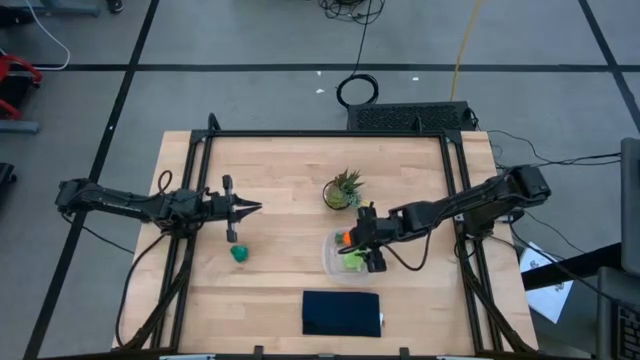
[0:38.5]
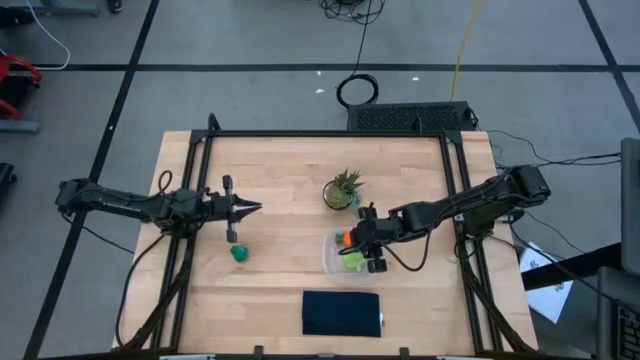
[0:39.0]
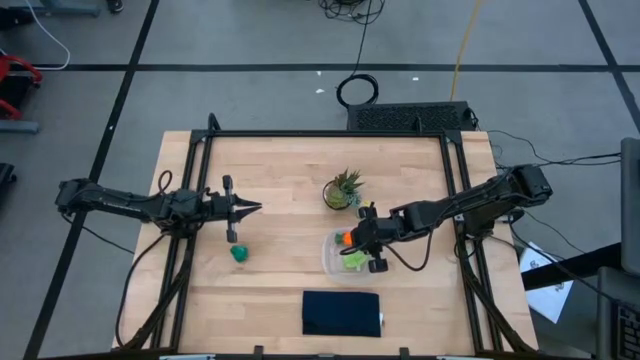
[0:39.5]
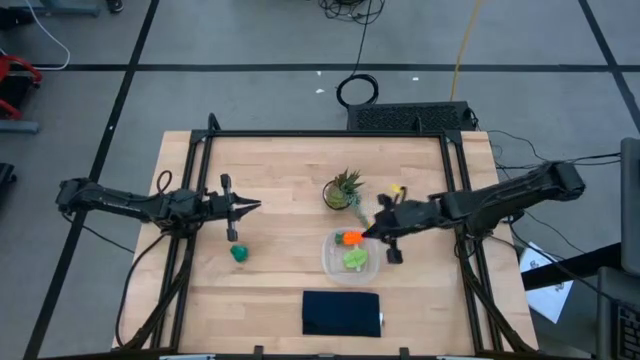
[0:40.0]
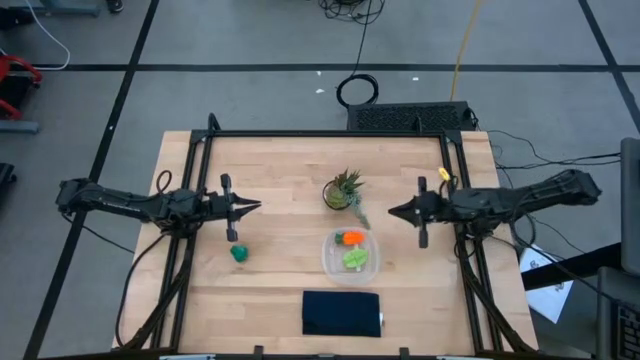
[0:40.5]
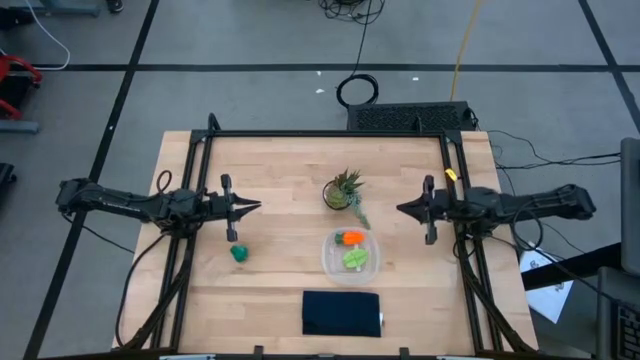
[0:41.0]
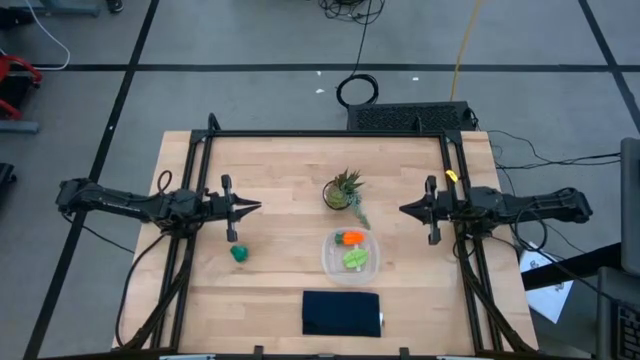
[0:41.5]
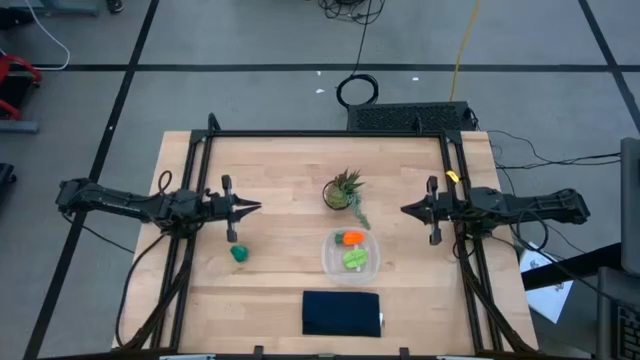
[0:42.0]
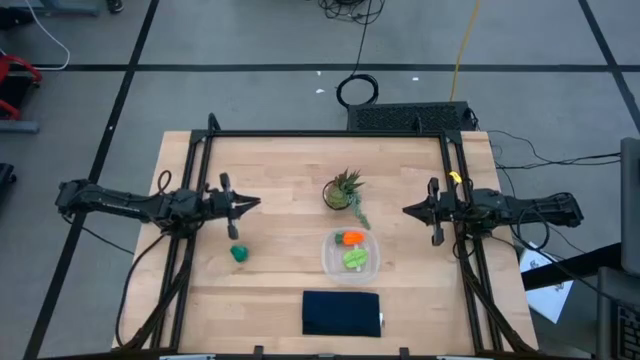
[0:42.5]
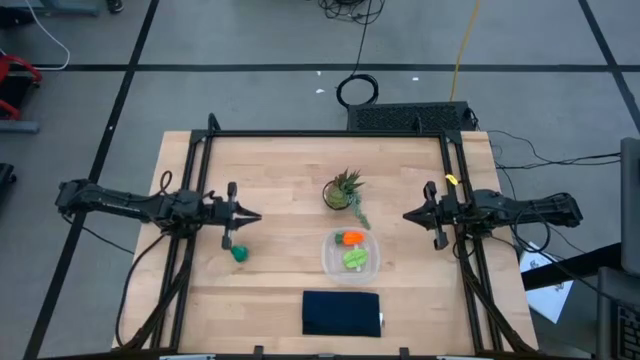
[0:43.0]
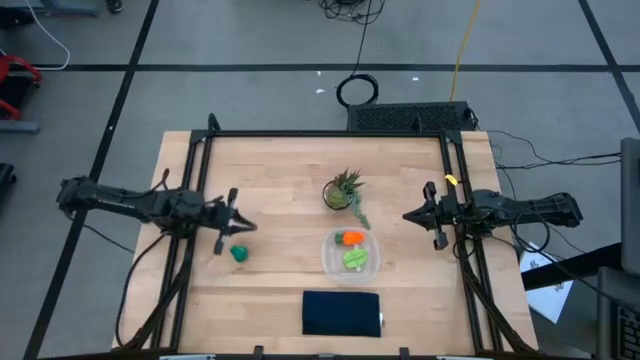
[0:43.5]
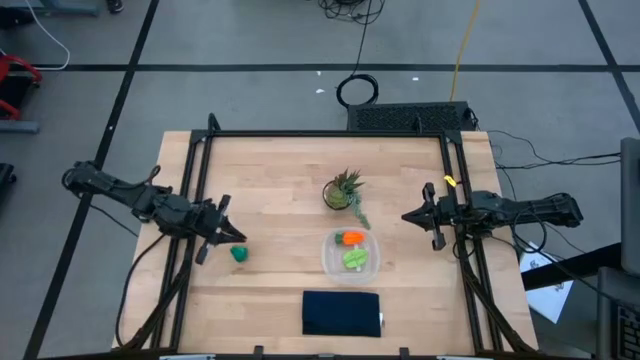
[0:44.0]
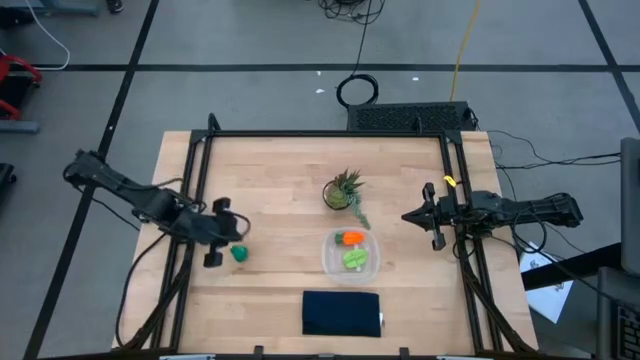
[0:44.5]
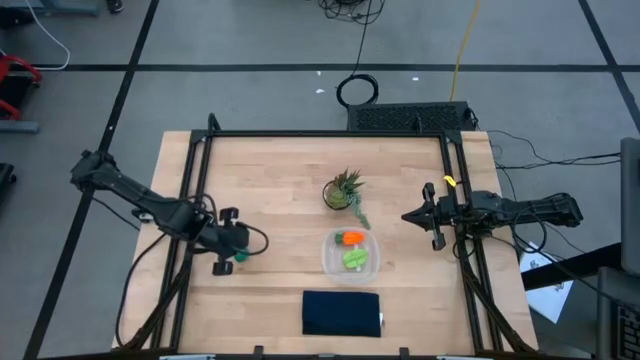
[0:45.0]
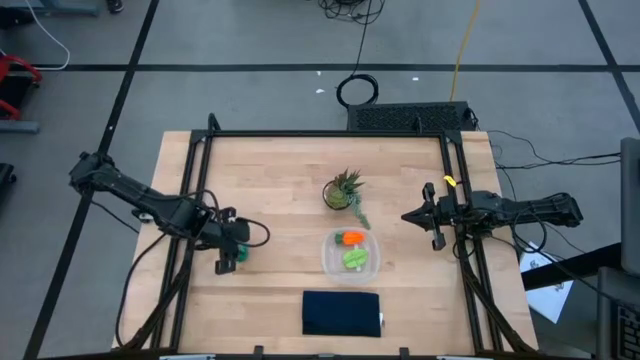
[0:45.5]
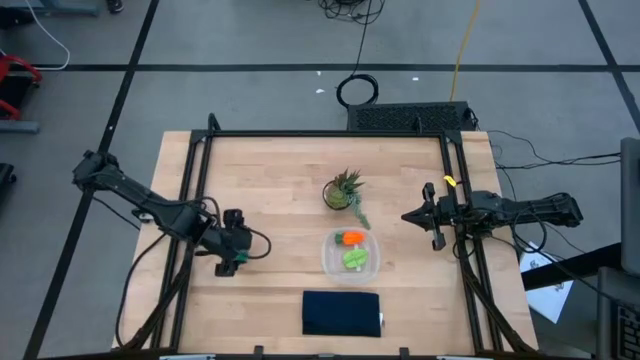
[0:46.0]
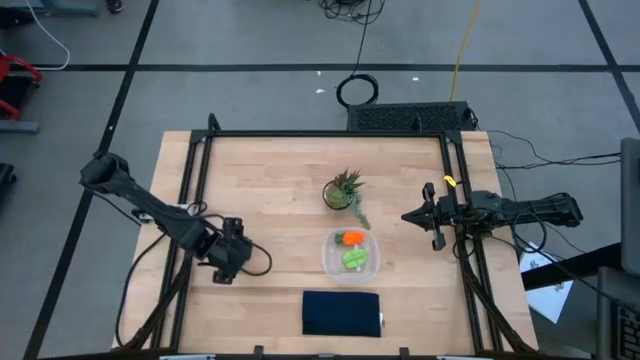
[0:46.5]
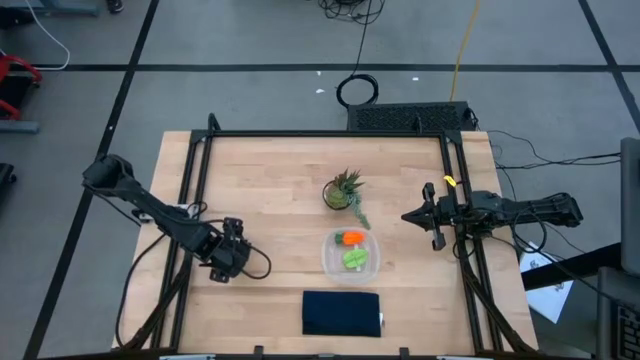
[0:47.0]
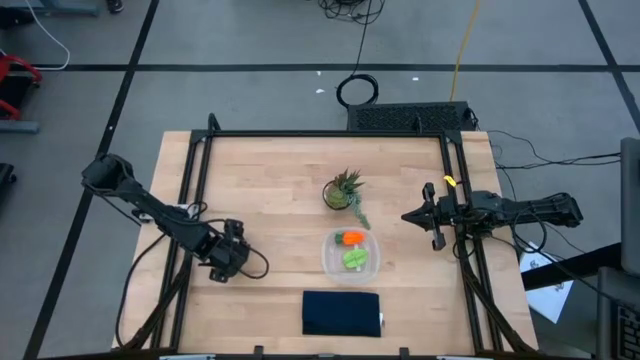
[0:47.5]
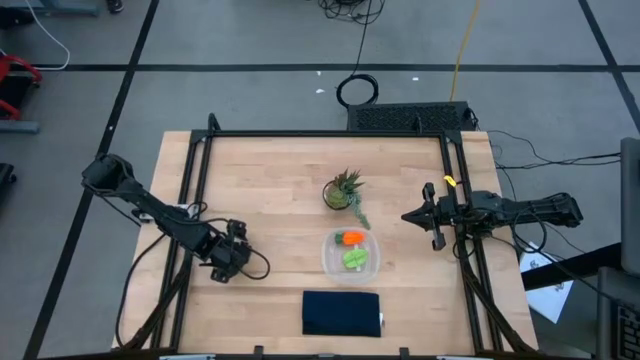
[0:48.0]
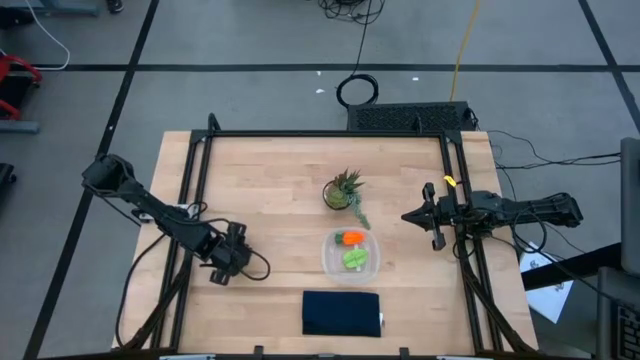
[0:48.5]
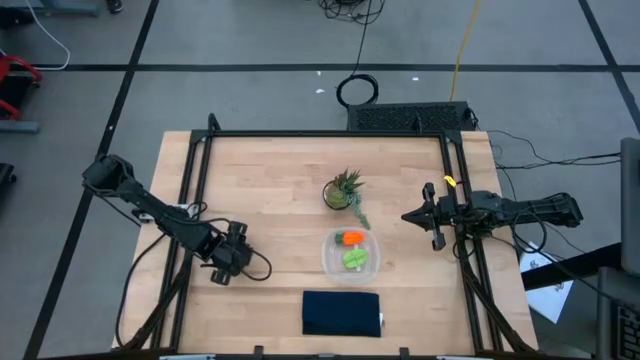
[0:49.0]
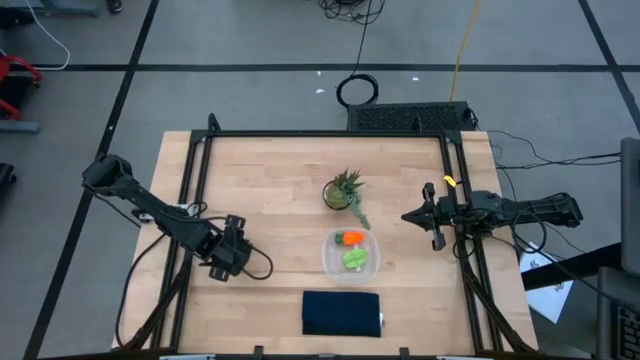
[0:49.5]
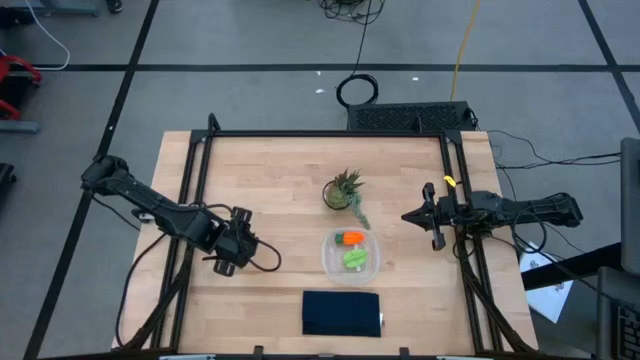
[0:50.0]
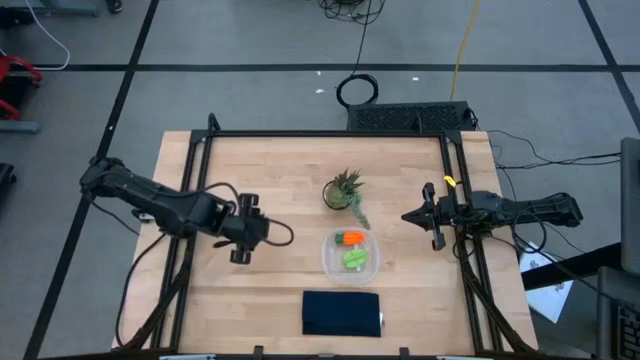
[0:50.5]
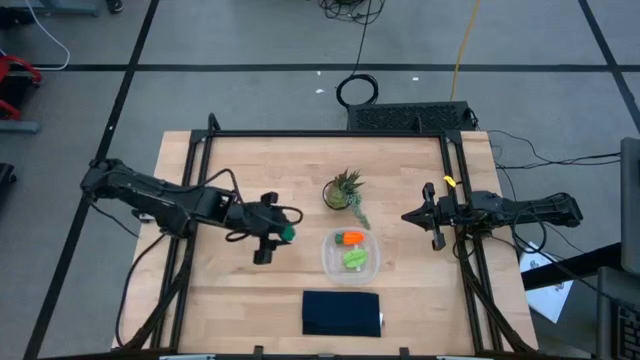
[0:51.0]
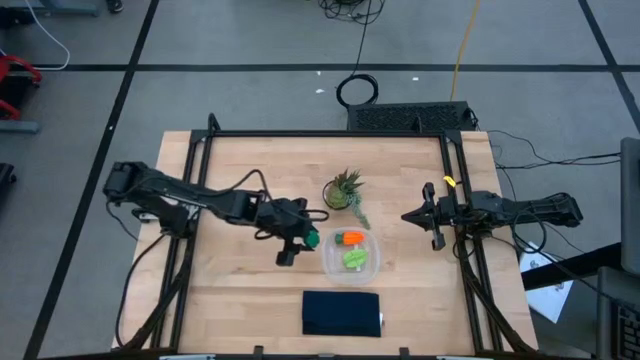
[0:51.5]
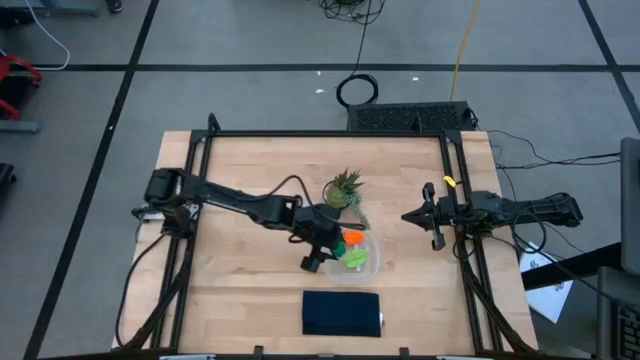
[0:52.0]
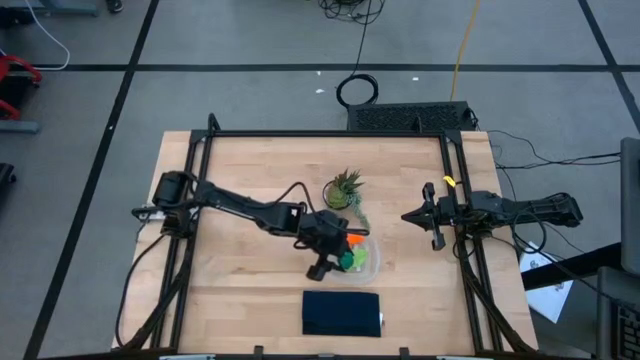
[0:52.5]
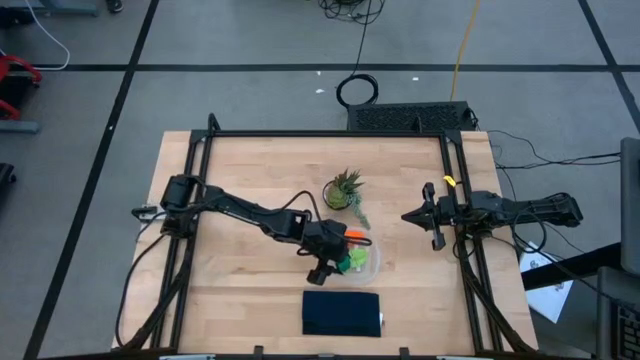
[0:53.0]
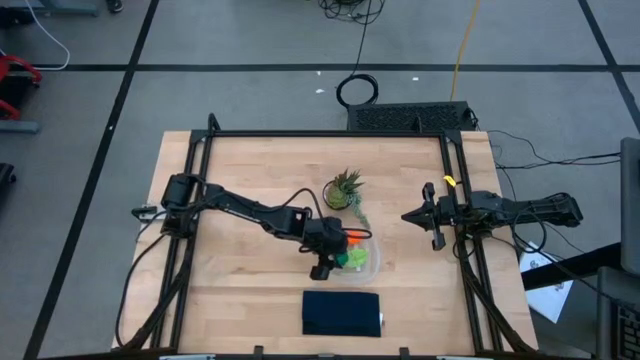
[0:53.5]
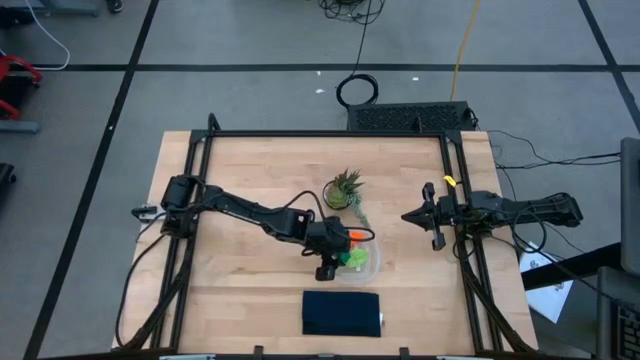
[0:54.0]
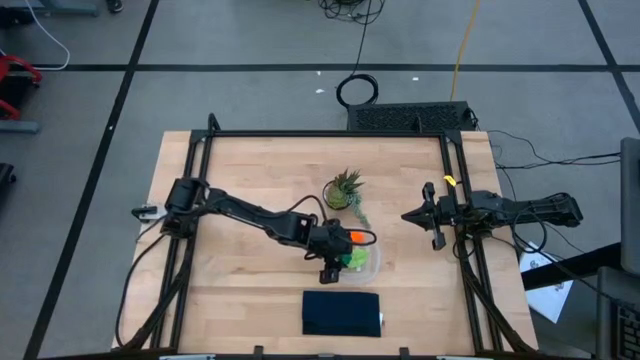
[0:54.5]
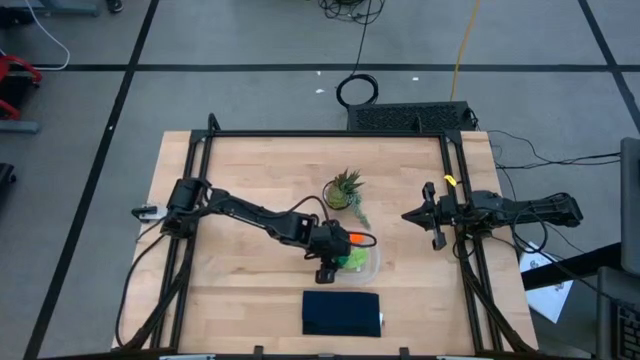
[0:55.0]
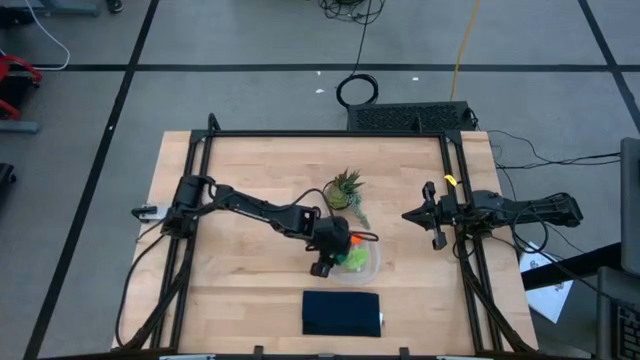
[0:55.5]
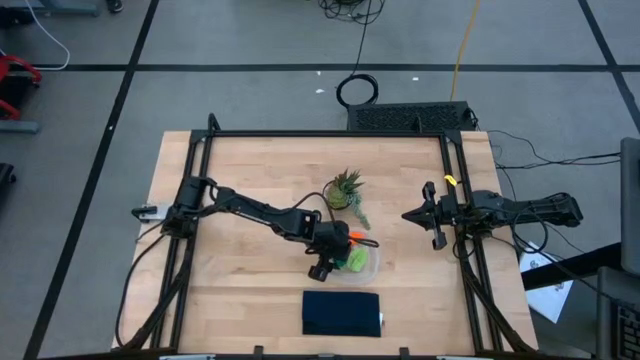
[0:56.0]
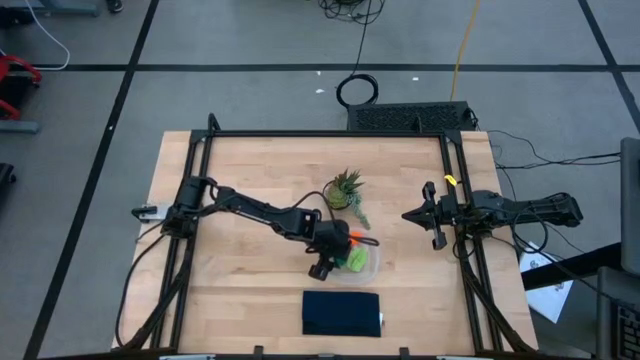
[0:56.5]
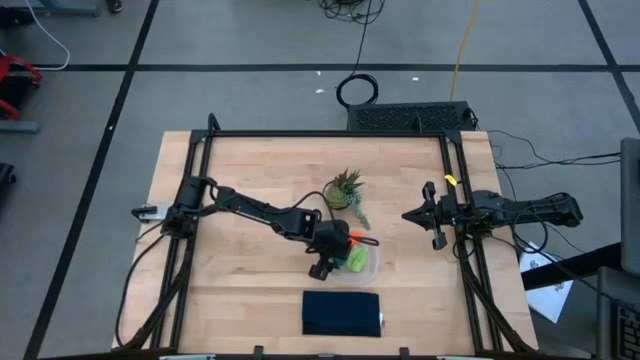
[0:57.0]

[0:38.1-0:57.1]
Task: Pick and placing Produce into tupperware
Put the green bell pepper into the transparent bin
